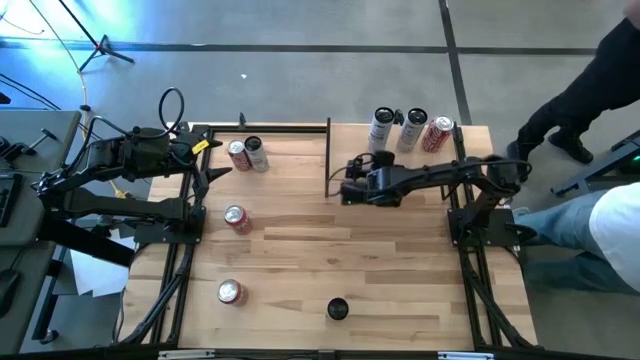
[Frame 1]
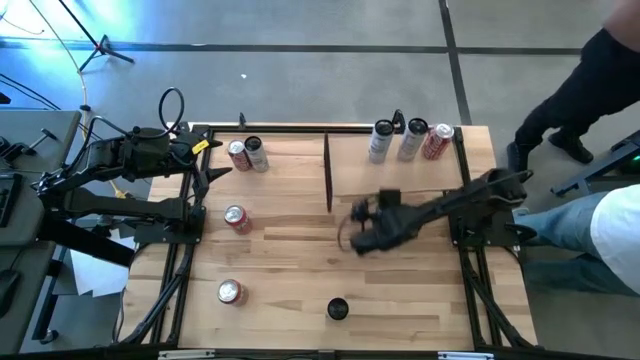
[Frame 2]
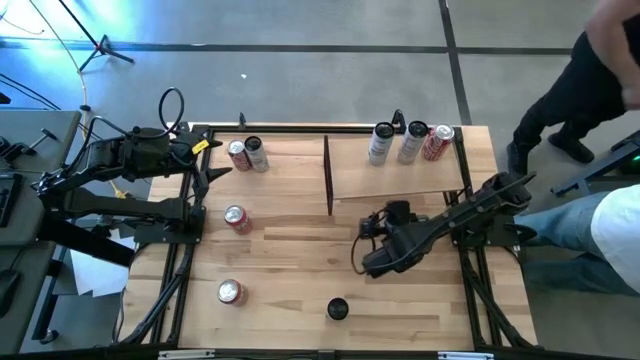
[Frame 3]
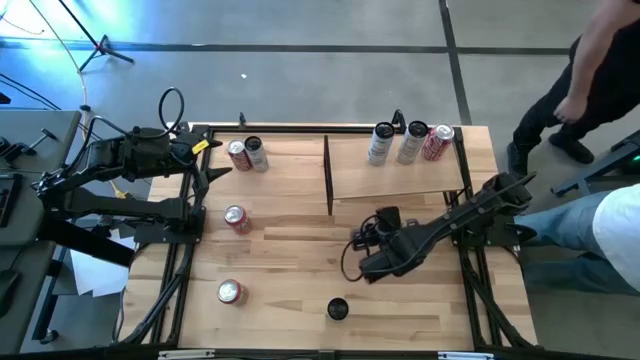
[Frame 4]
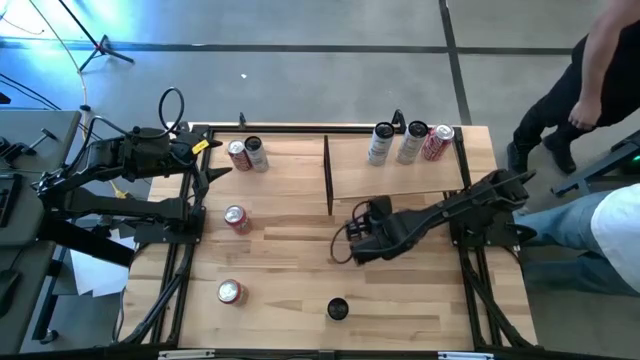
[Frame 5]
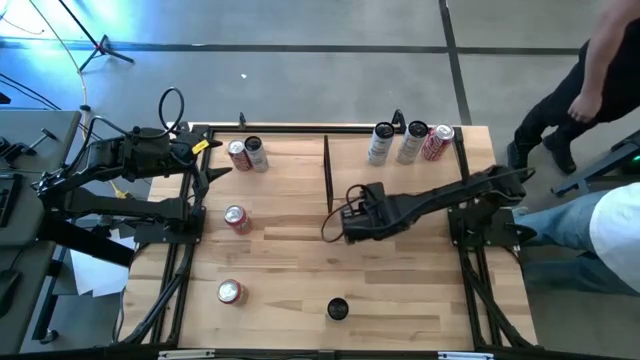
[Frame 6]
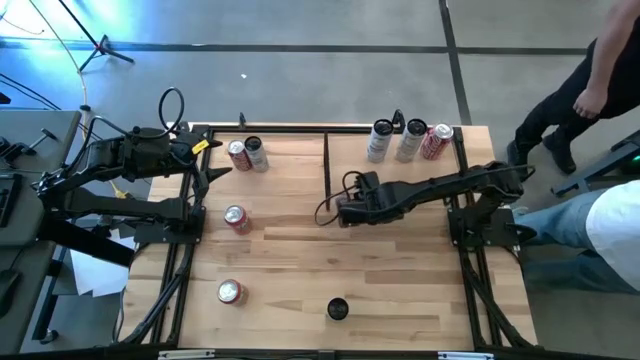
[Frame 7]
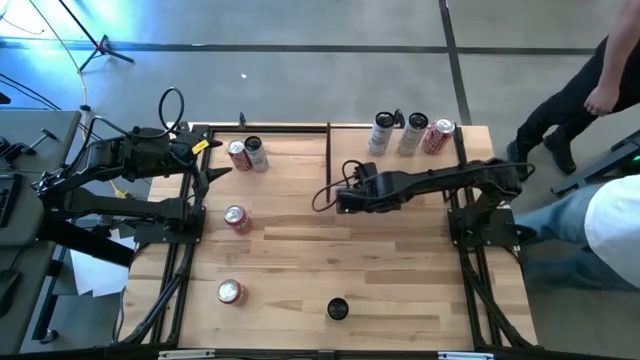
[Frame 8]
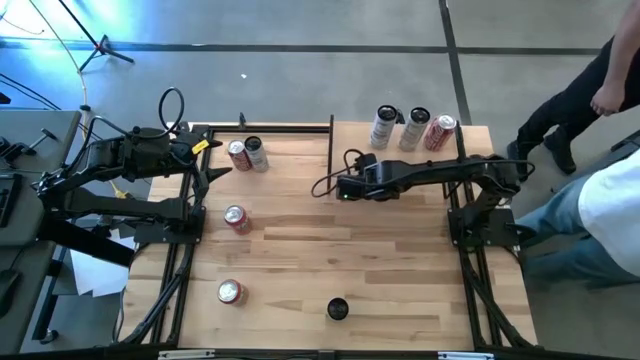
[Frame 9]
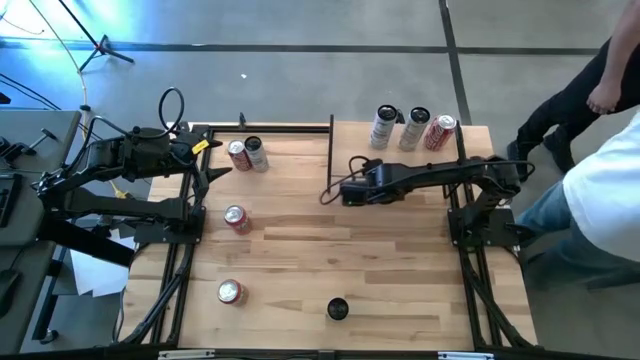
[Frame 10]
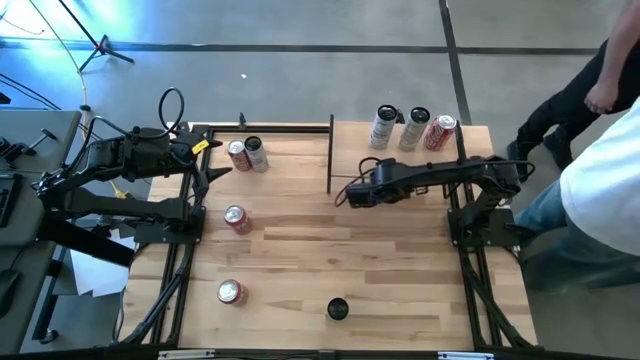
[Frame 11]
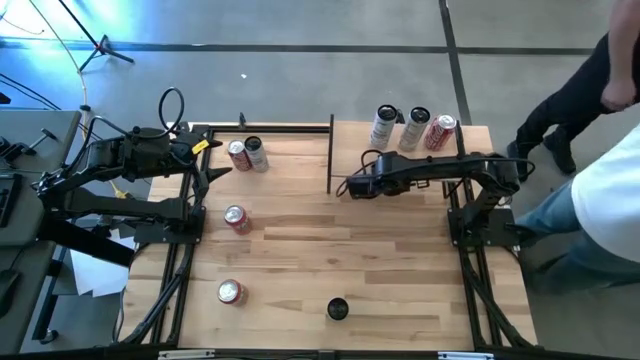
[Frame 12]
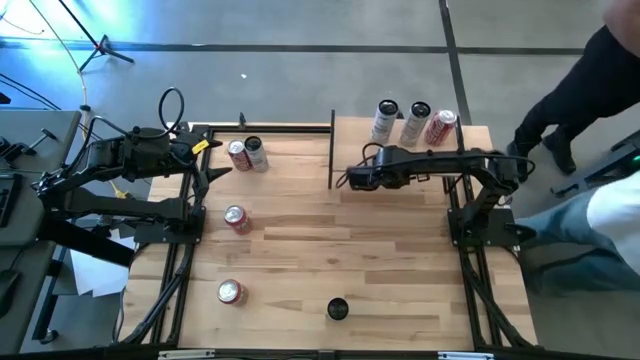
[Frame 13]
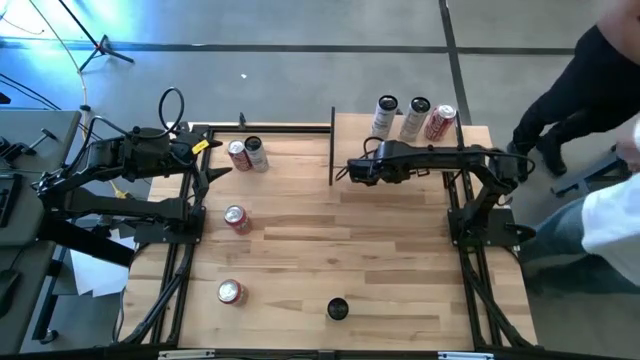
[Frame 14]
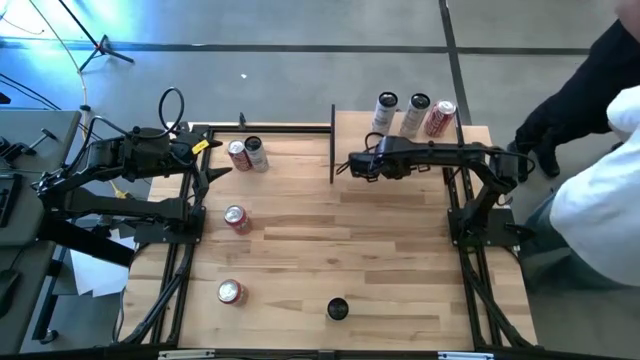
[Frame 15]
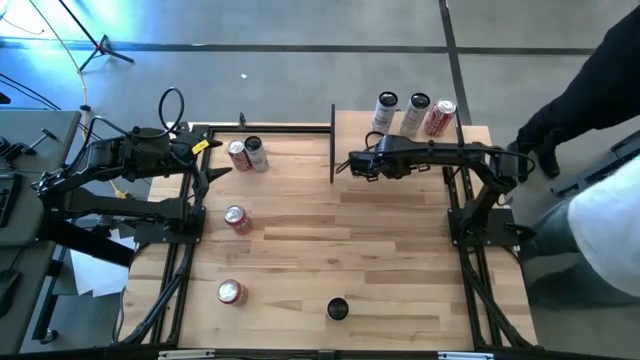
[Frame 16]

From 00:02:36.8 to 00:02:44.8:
Task: Place canned beverage on shelf
Move the shelf to the top right of the table

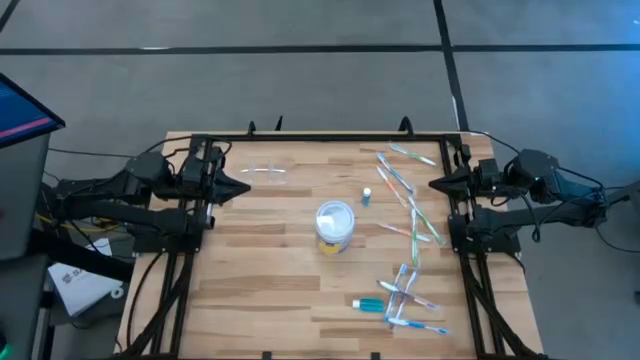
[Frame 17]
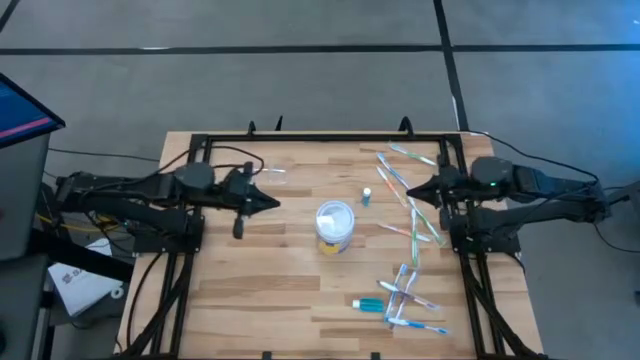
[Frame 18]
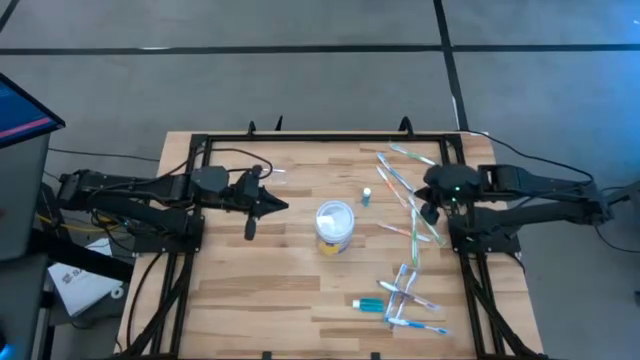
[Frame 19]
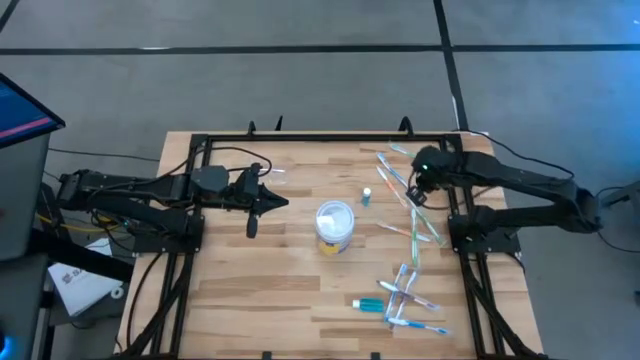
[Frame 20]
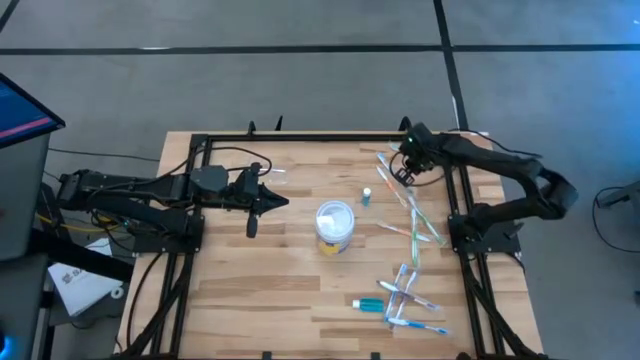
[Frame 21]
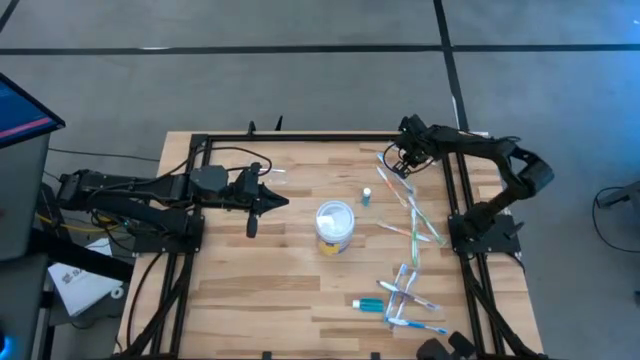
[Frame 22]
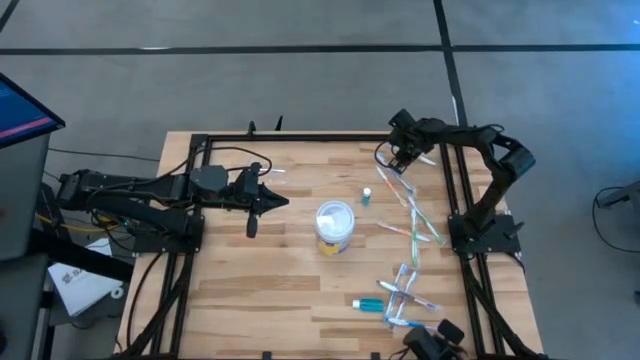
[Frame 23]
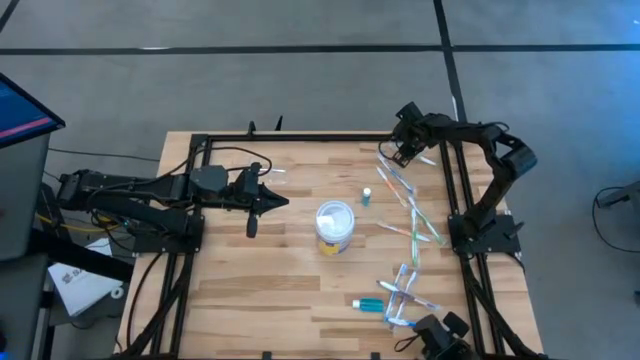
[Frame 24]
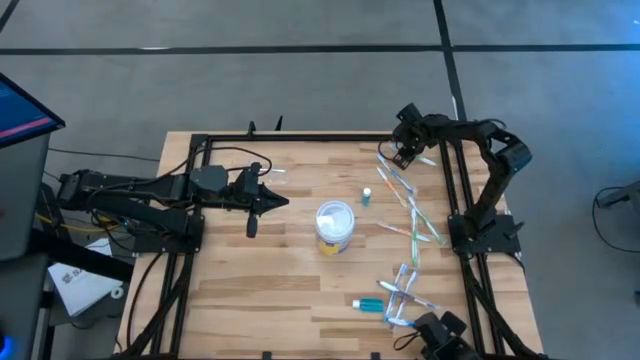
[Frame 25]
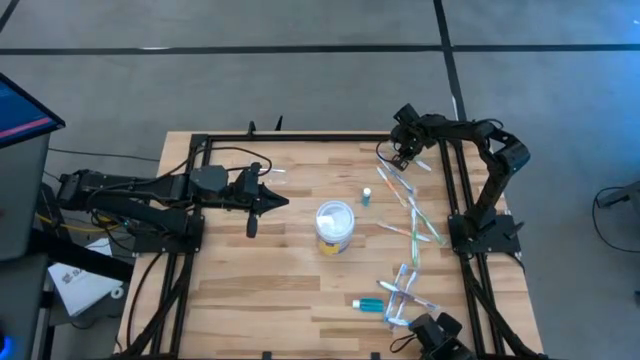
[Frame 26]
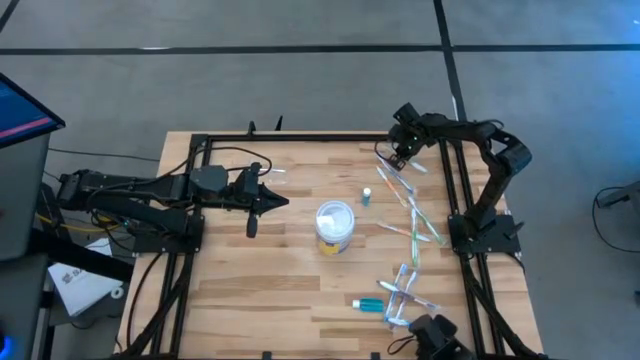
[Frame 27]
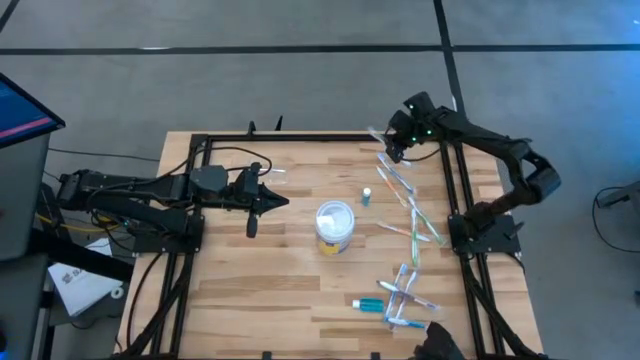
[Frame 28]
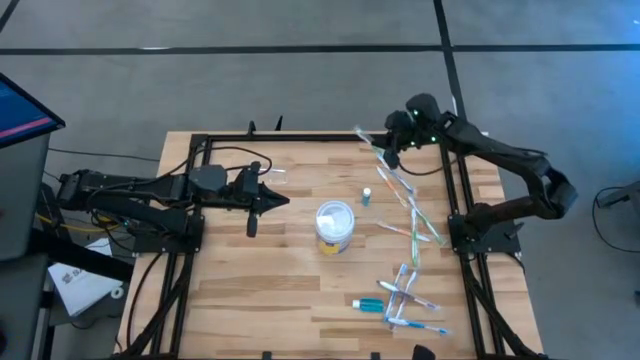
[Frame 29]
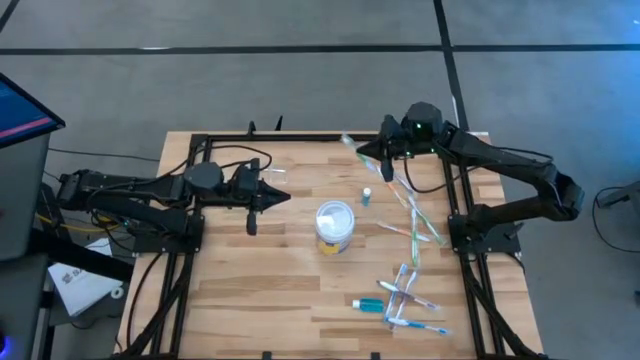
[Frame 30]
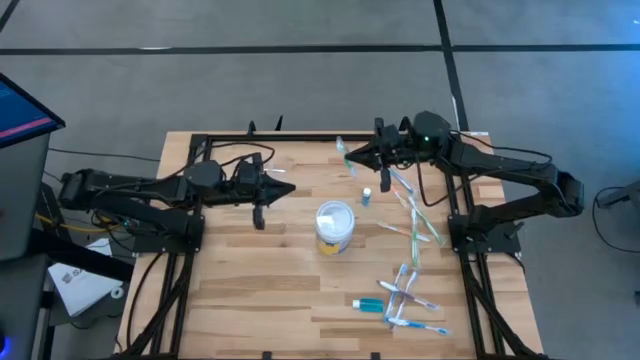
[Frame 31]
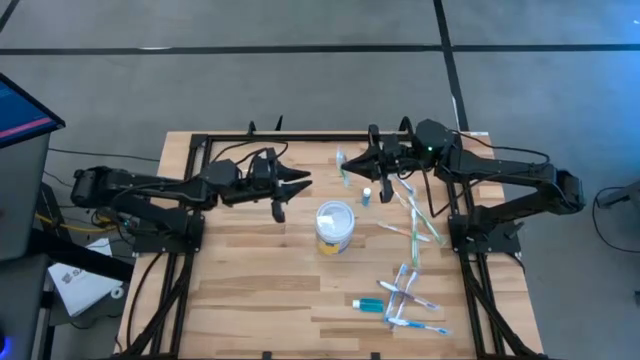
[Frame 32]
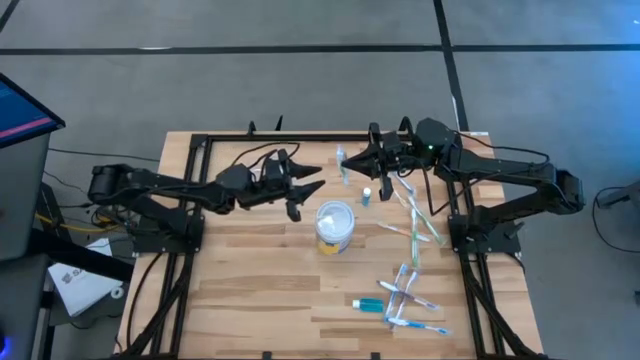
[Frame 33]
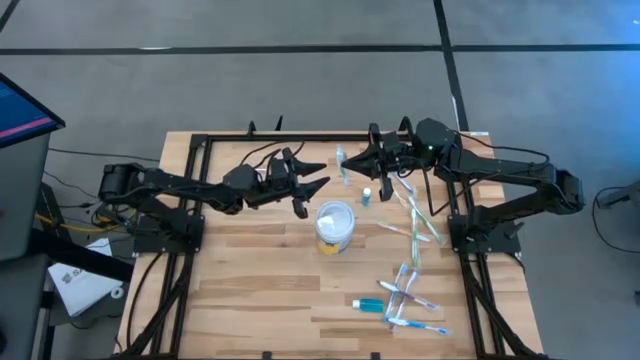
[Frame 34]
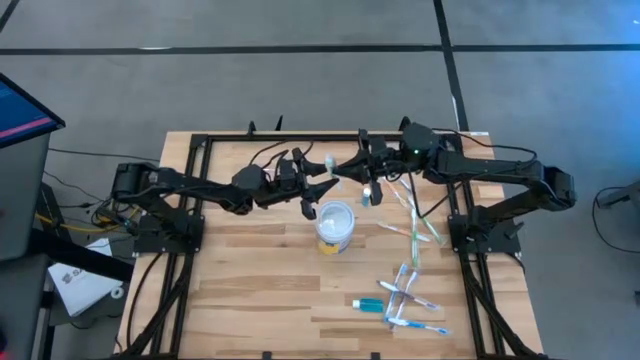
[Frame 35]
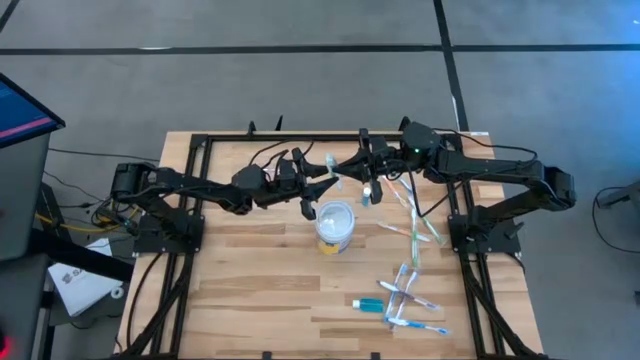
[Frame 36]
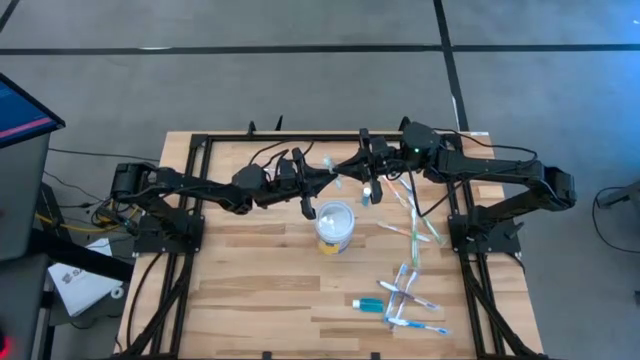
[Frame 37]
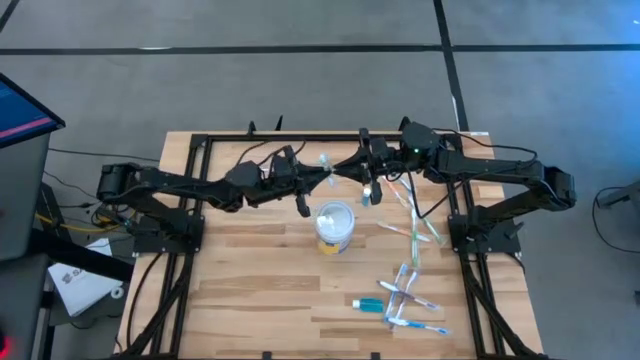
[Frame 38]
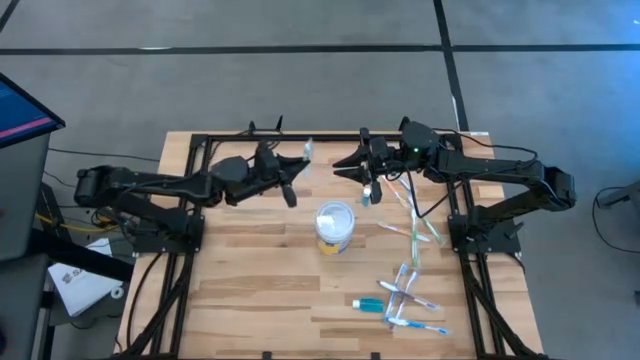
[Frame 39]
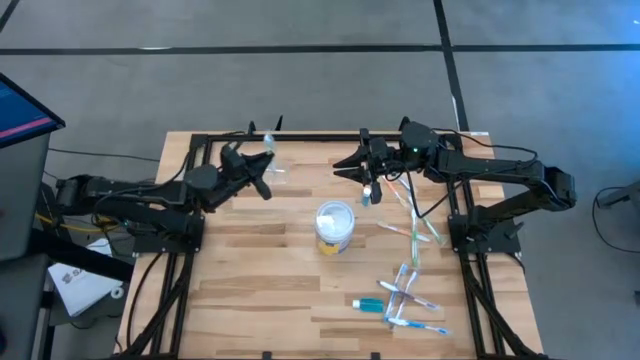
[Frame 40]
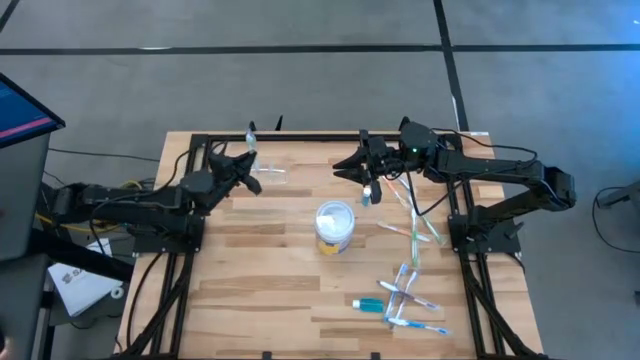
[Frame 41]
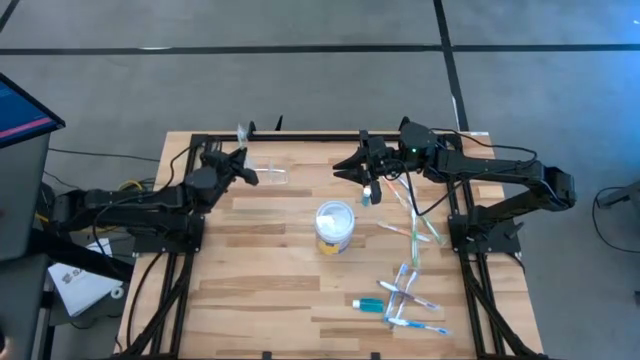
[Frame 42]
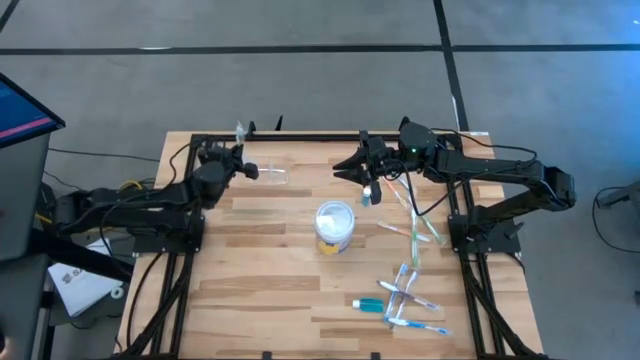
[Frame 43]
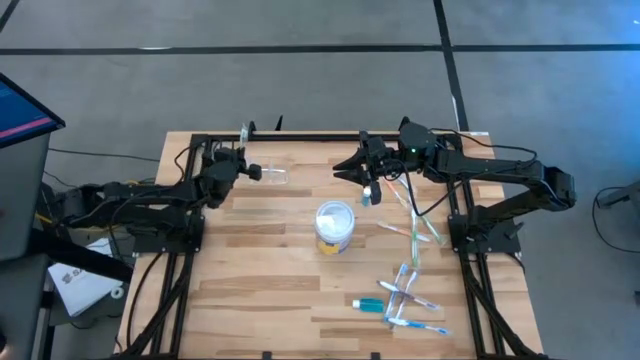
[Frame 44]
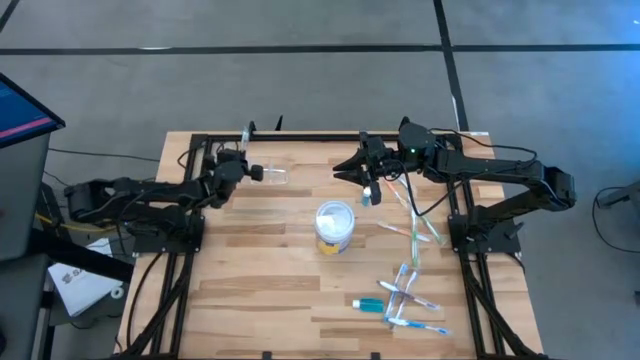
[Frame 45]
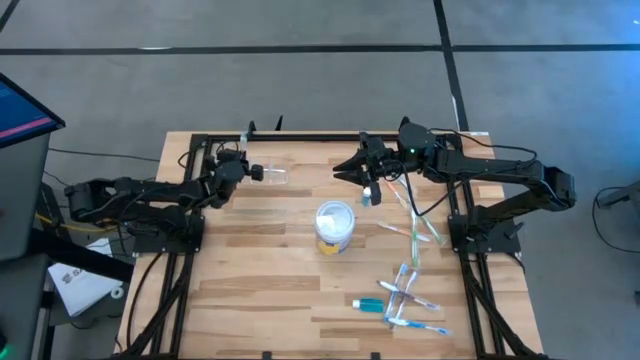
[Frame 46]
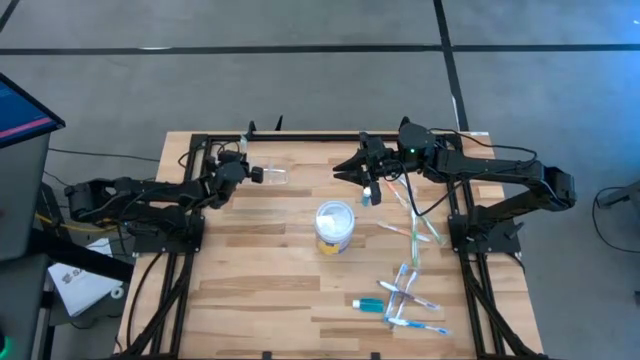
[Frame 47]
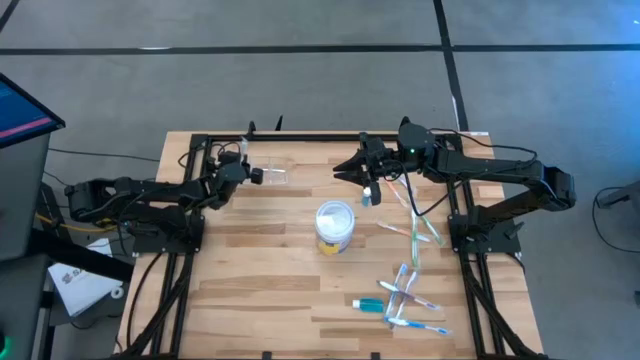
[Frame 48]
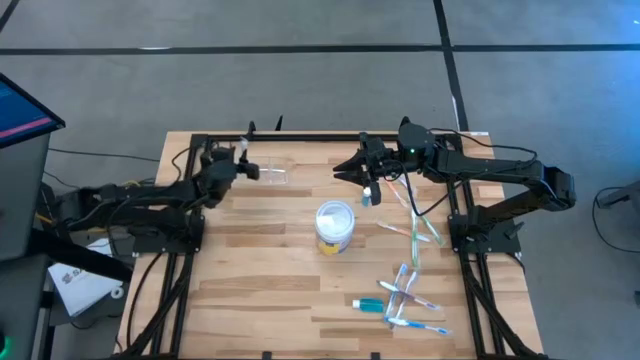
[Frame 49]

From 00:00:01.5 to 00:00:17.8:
Task: Pick & Place toothbrushing station
Put the top green toothbrush into the transparent organizer
